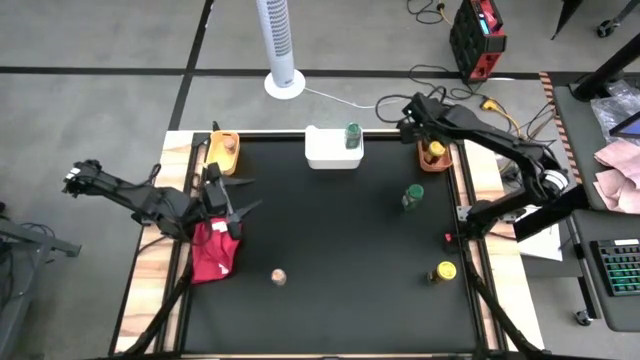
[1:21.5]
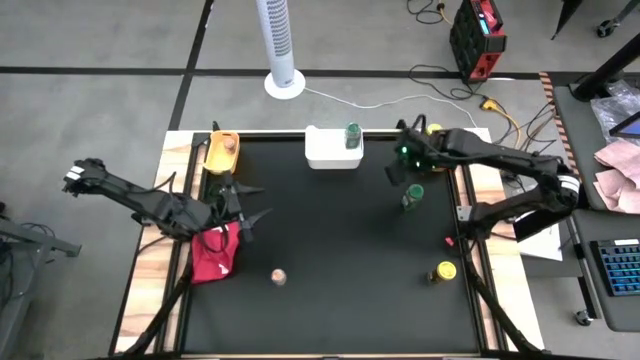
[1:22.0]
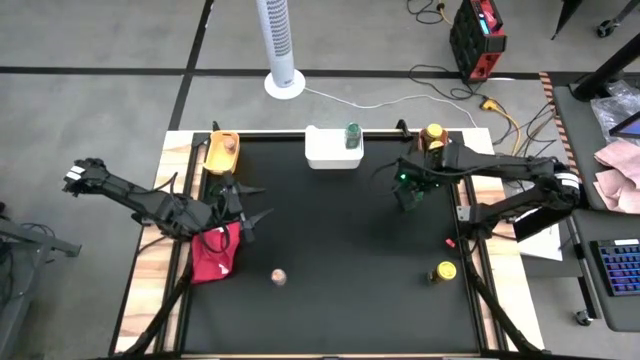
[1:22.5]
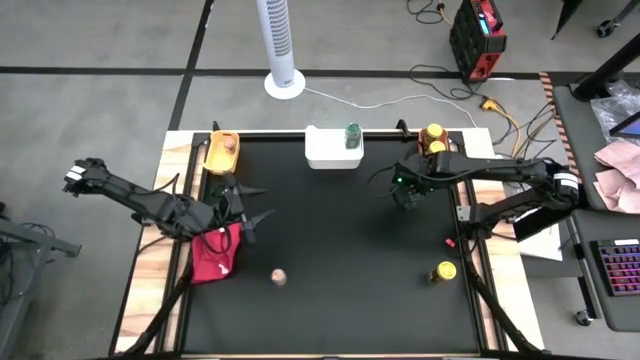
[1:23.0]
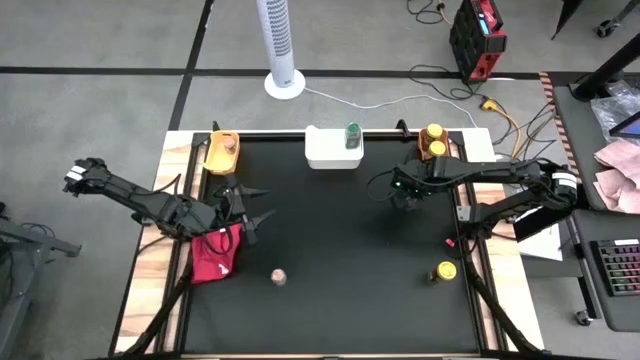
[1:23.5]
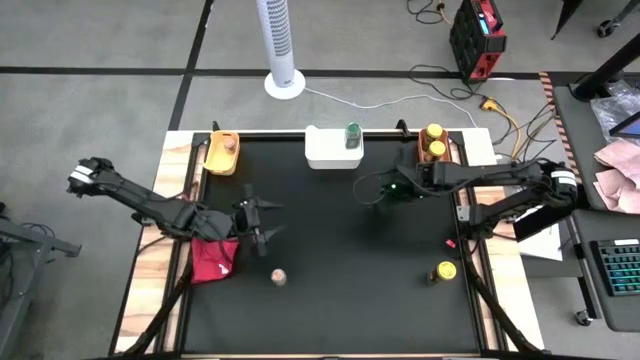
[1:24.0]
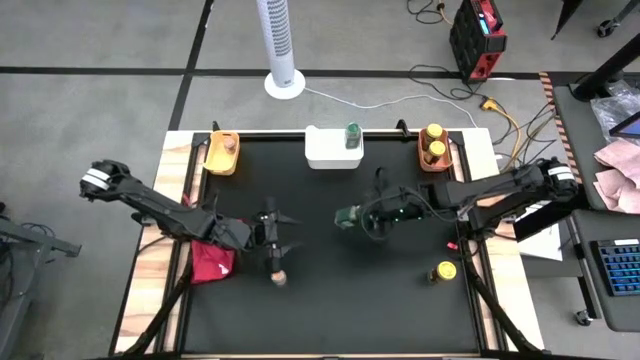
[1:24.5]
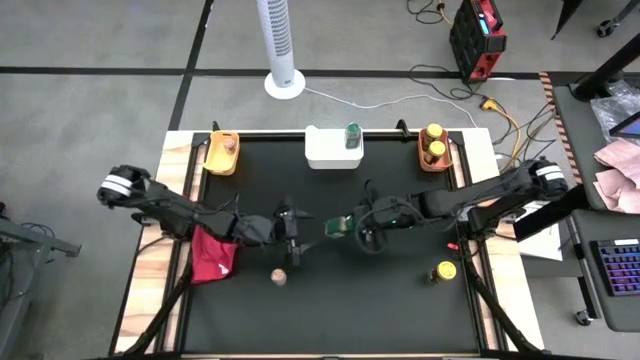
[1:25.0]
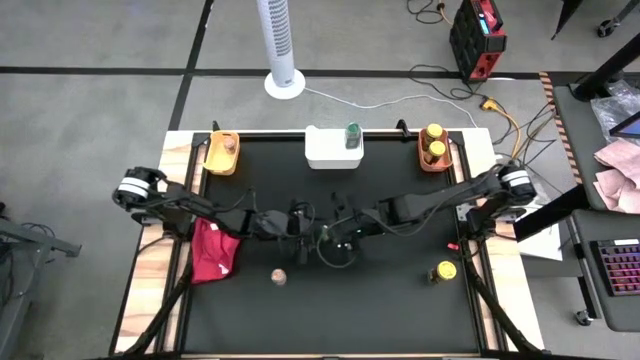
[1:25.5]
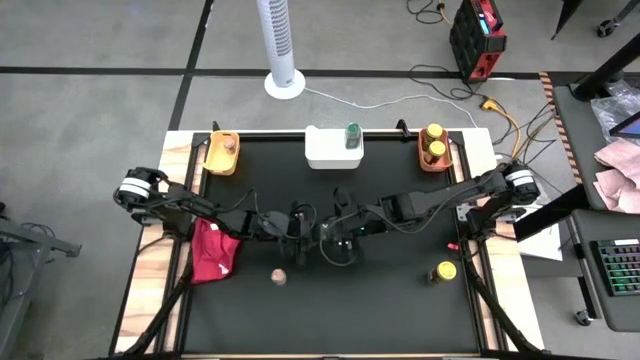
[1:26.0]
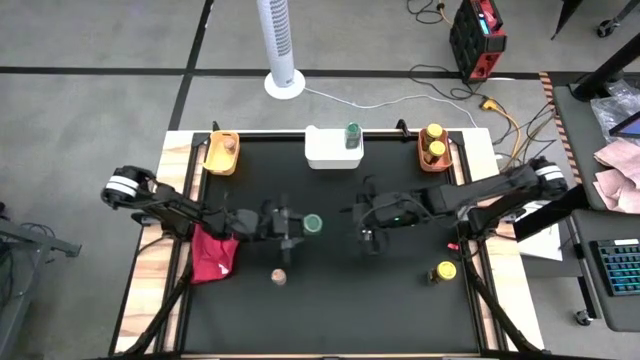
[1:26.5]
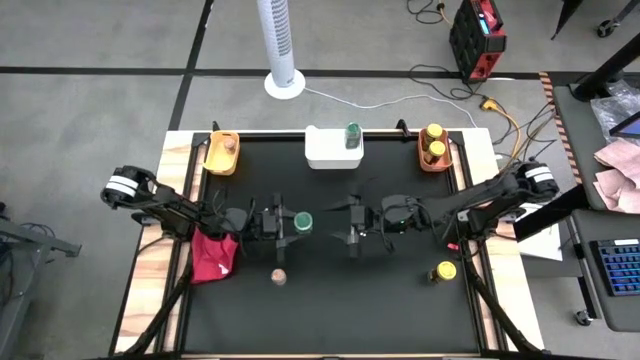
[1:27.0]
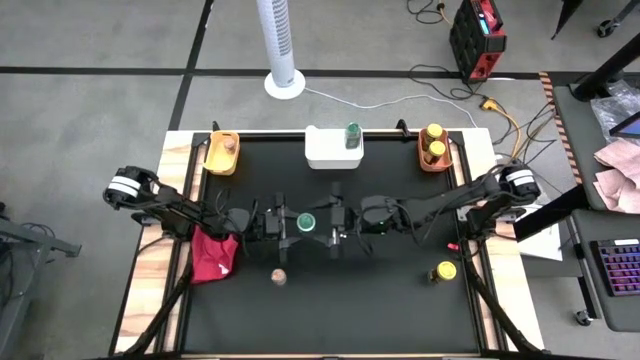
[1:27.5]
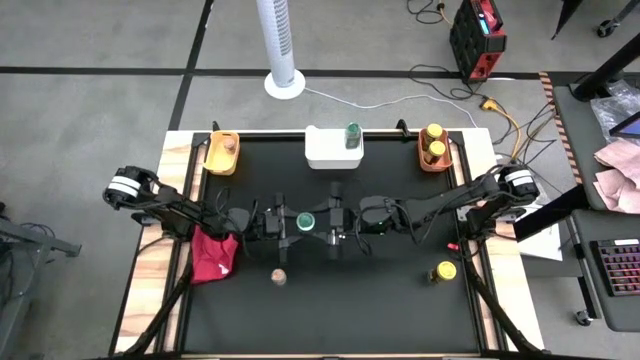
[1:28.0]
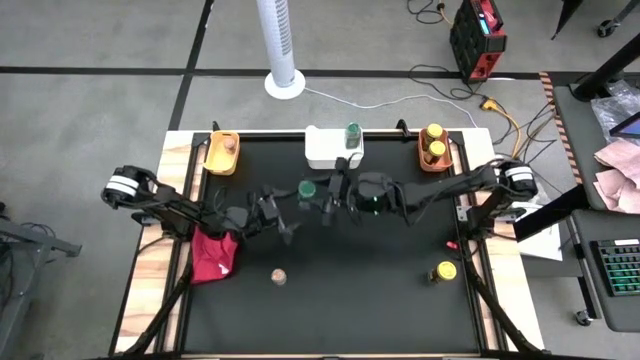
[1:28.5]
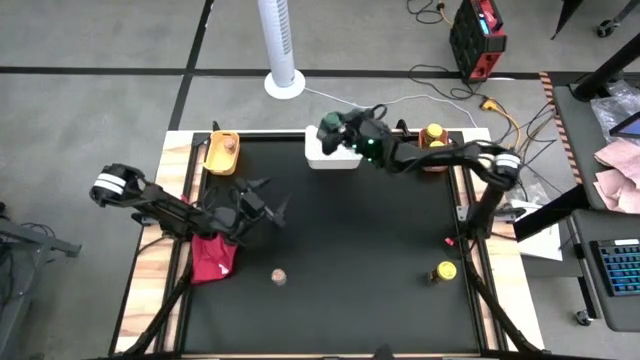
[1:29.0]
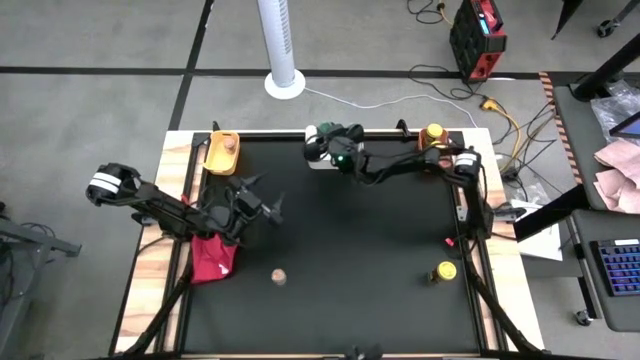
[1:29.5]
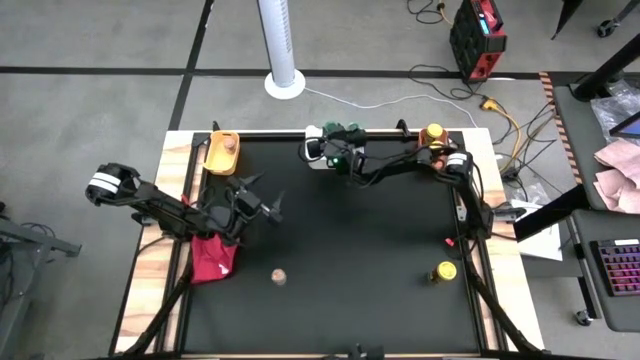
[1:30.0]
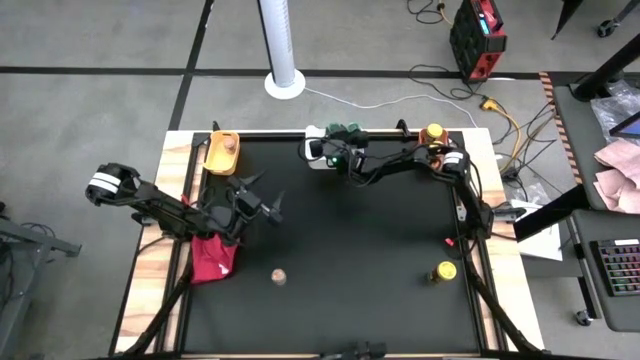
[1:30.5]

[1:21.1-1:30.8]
Task: Sort spices by type
Put the green spice bottle into the white bin

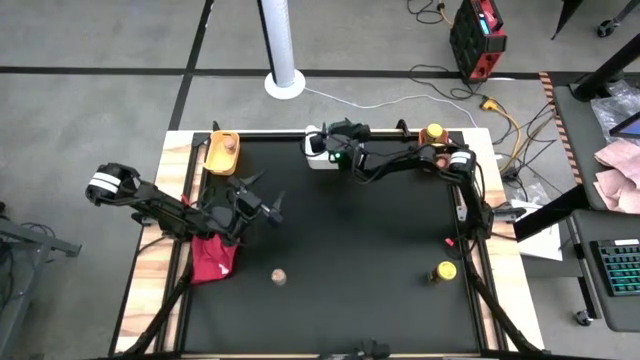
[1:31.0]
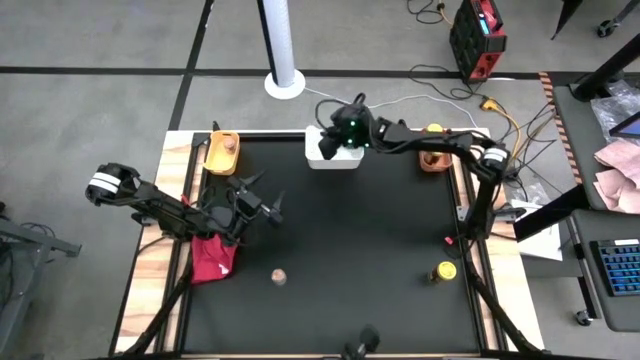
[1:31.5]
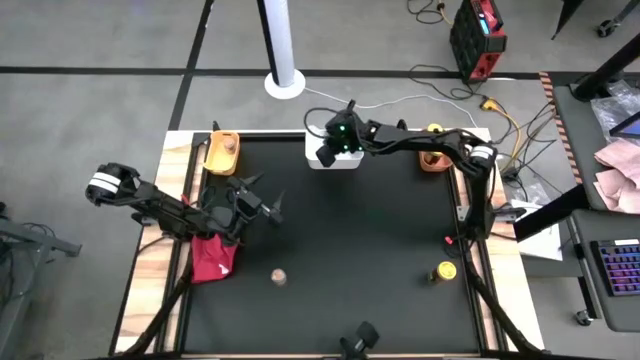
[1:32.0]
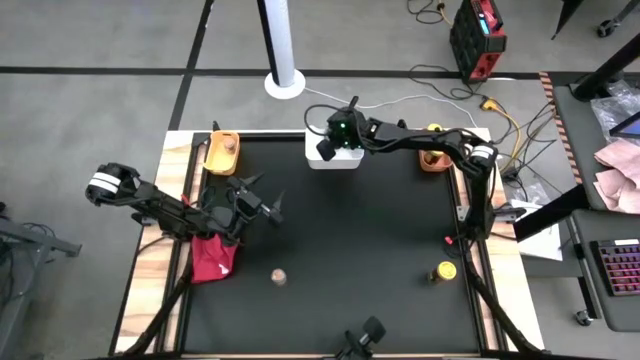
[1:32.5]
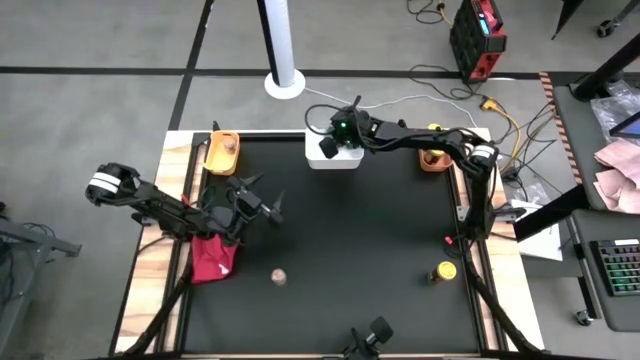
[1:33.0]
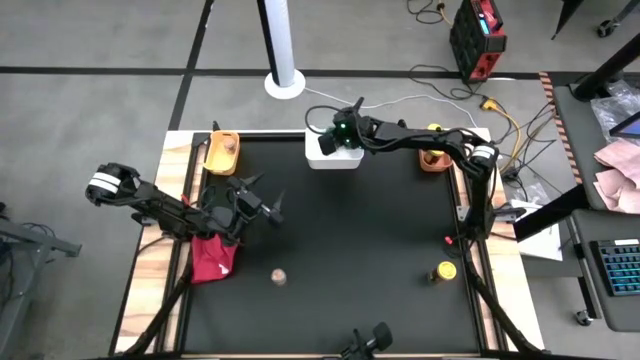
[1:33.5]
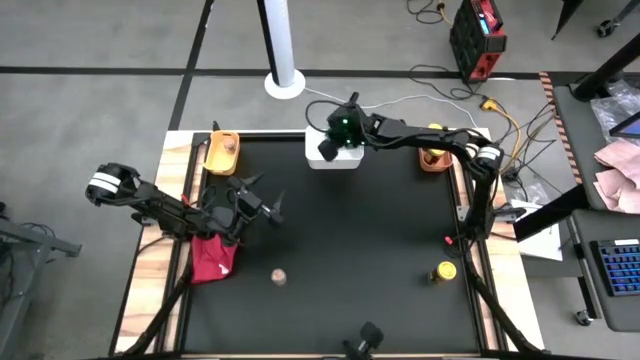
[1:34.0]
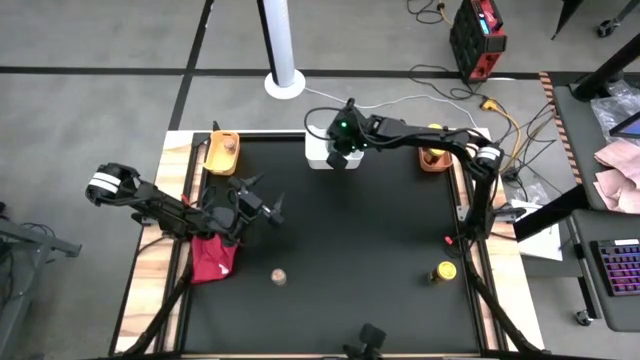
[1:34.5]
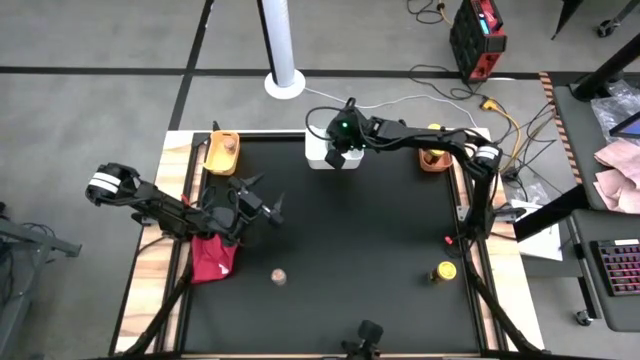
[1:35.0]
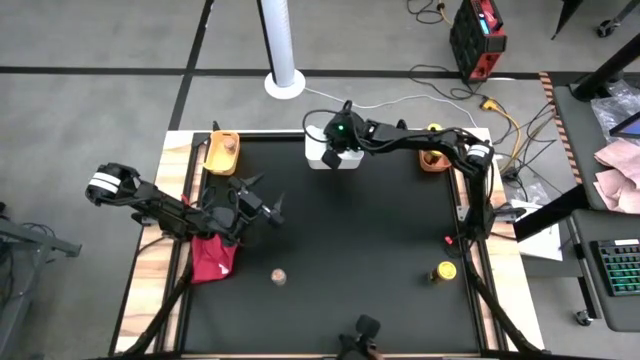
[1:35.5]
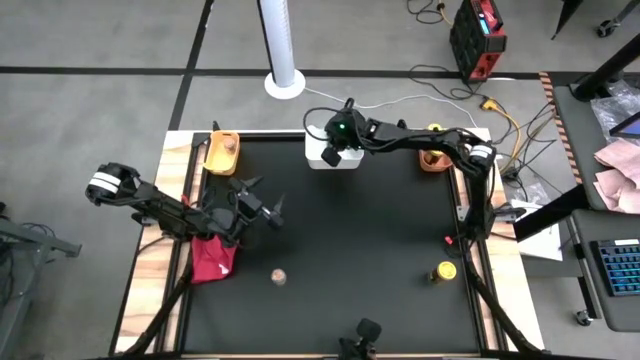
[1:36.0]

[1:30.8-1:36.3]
Adjust the green spice bottle into the white bin

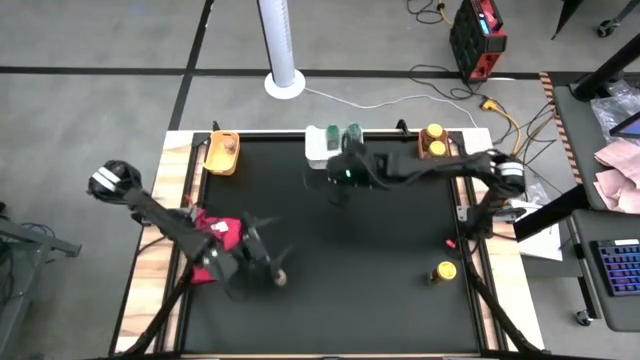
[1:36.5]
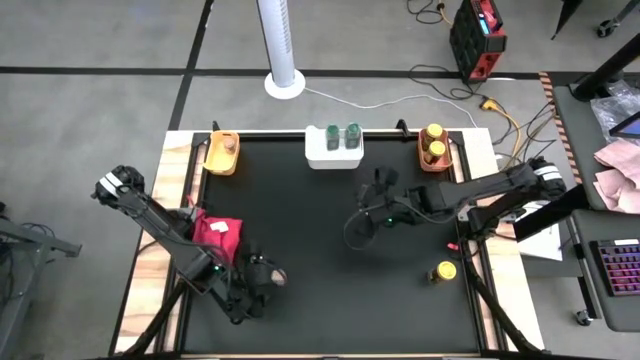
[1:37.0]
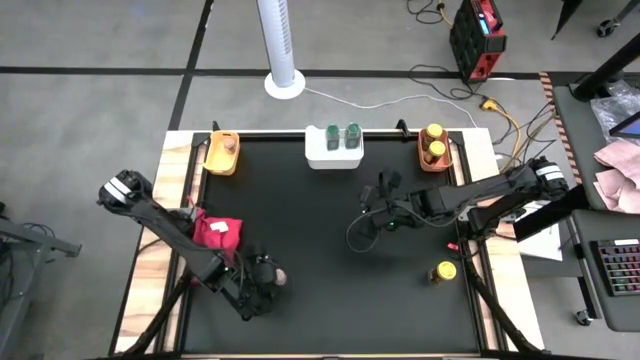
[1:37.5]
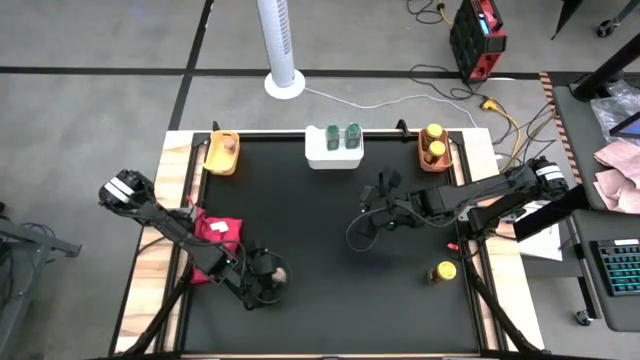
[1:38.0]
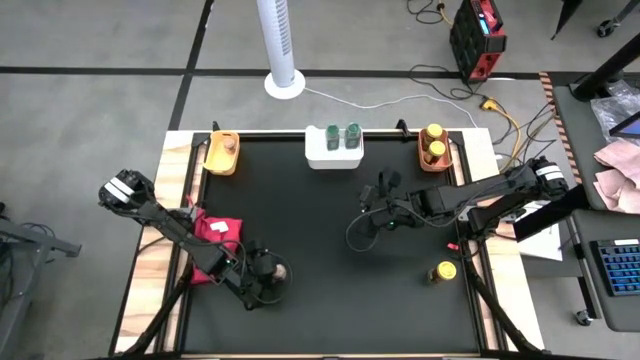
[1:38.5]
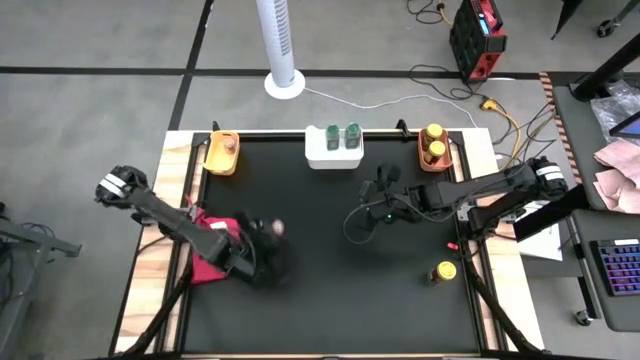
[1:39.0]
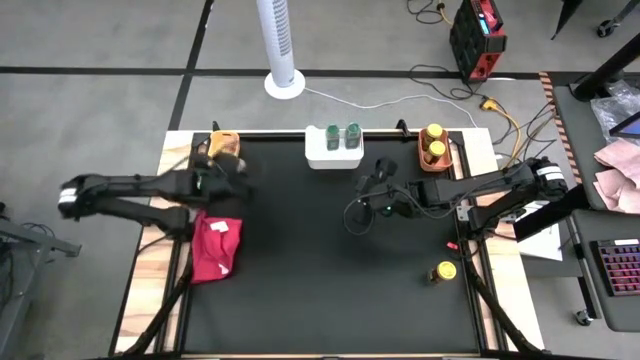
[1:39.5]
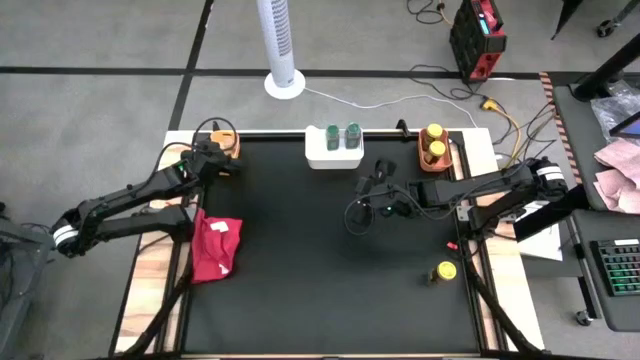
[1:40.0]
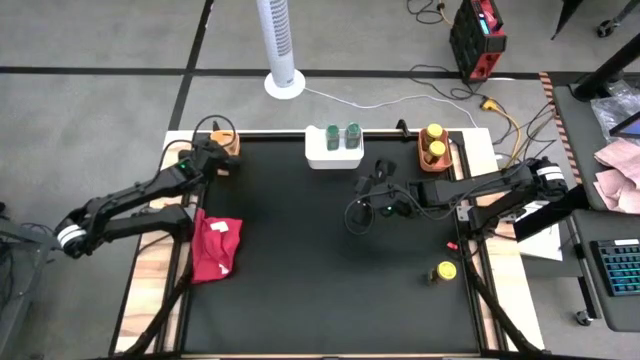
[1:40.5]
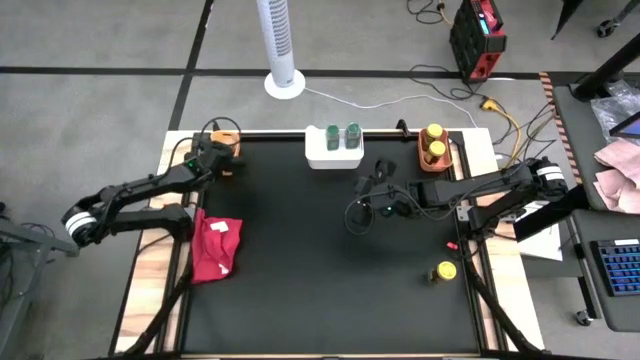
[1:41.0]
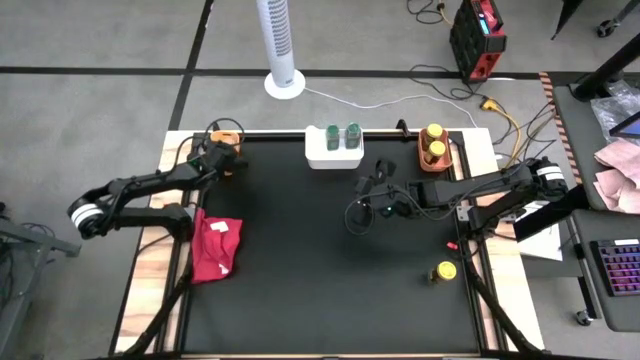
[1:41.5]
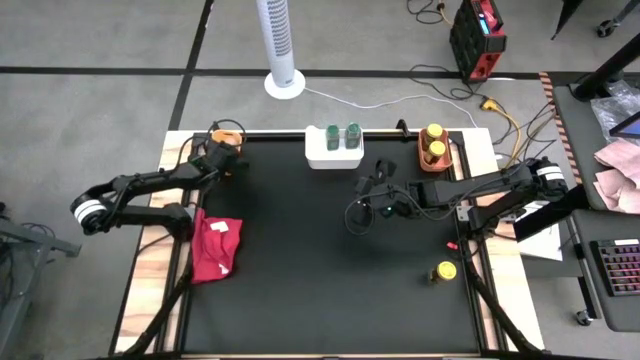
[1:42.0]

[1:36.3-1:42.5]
Put the transparent spice bottle into the yellow bin

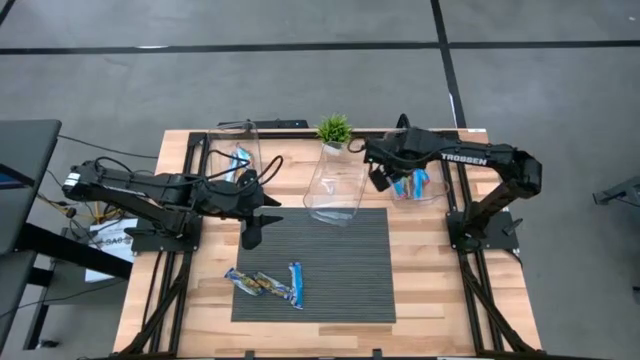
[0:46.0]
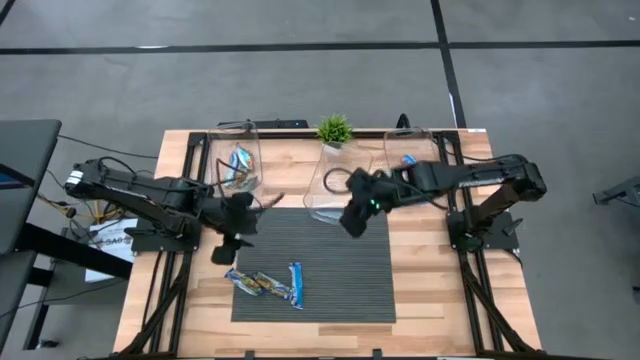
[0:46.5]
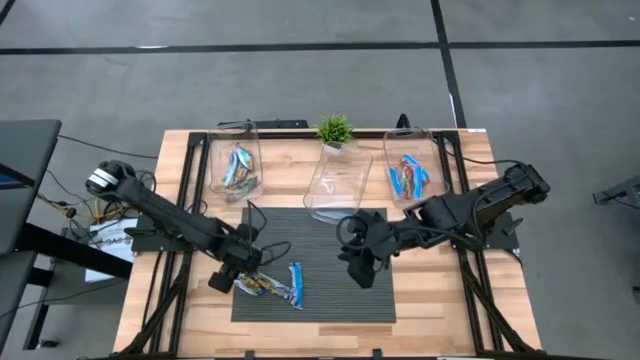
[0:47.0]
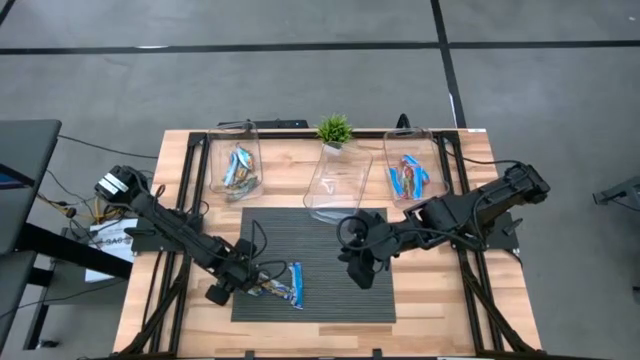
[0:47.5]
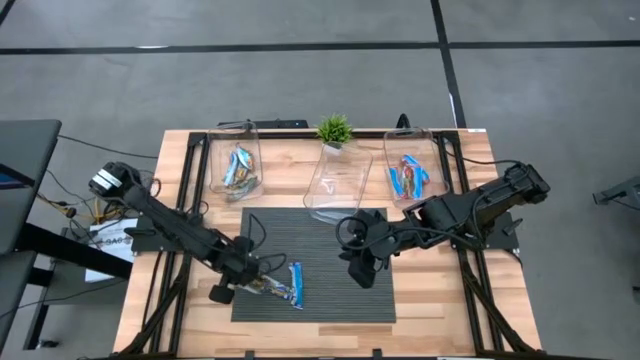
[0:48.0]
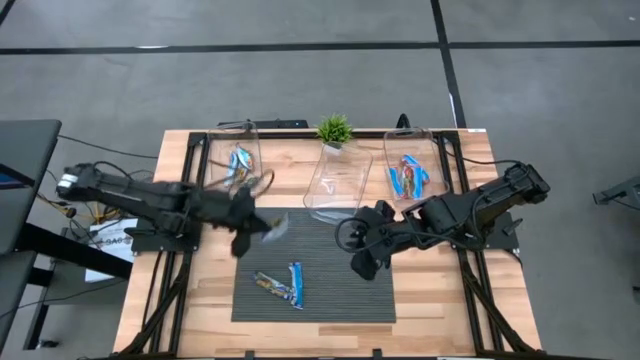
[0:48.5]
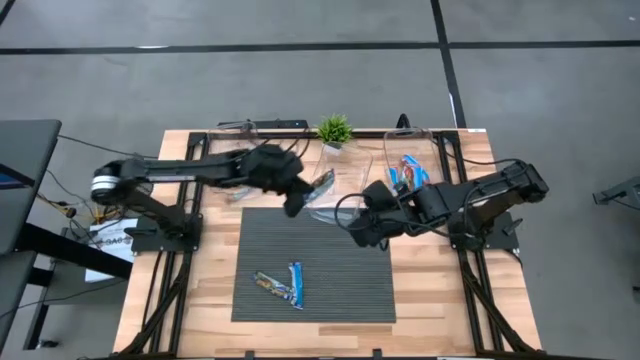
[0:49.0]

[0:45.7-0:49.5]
Task: Pick and place Granola Bars by type
Put the purple granola bar into the middle transparent bin
